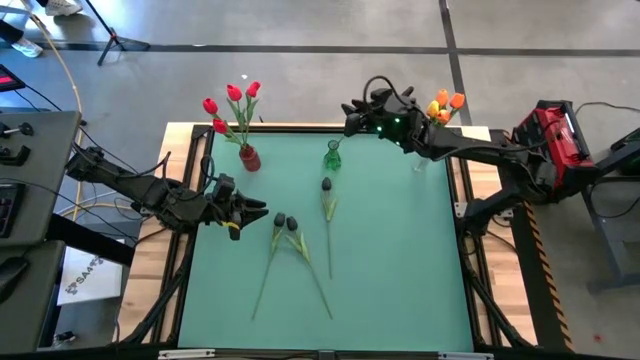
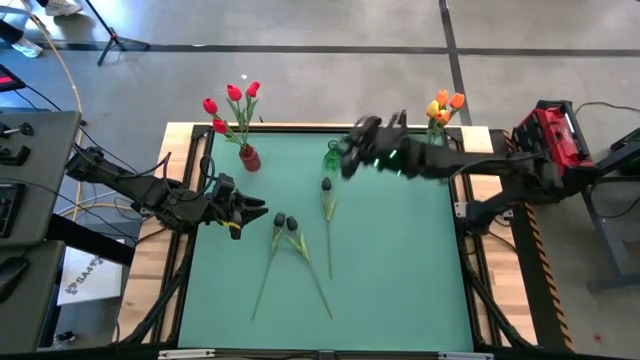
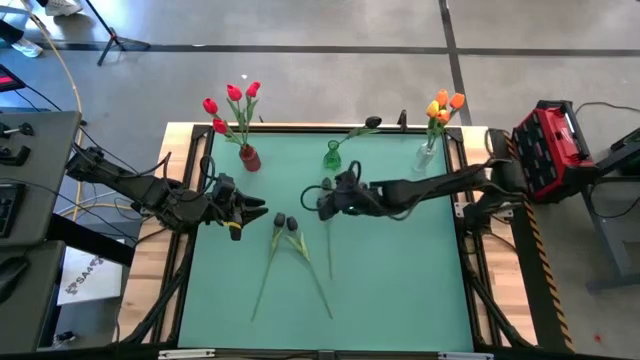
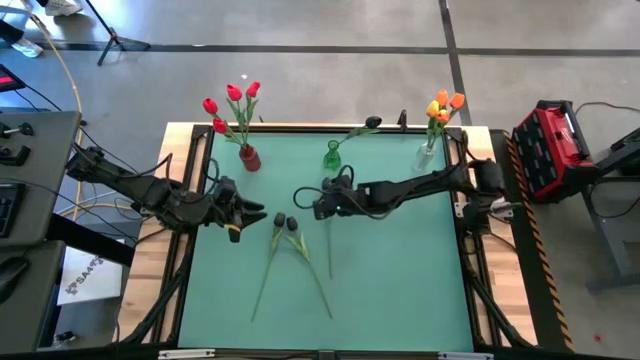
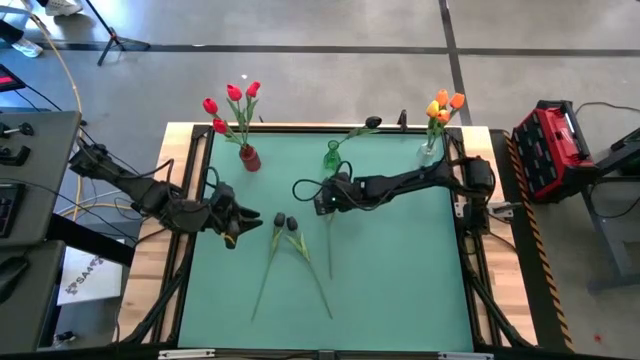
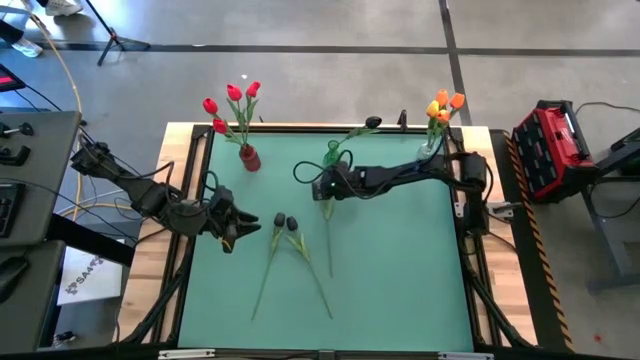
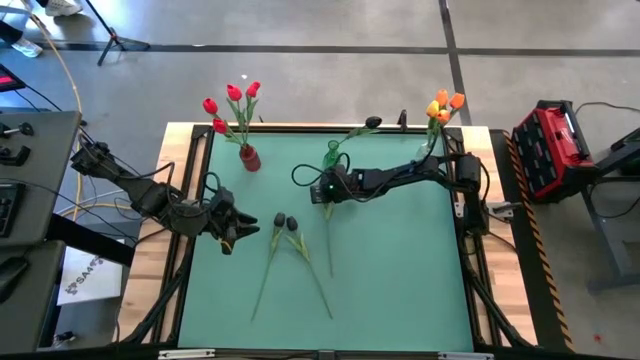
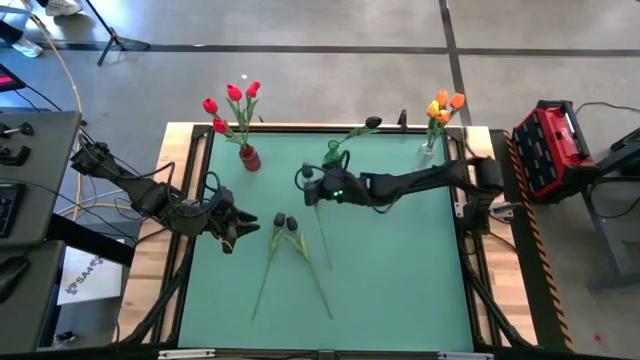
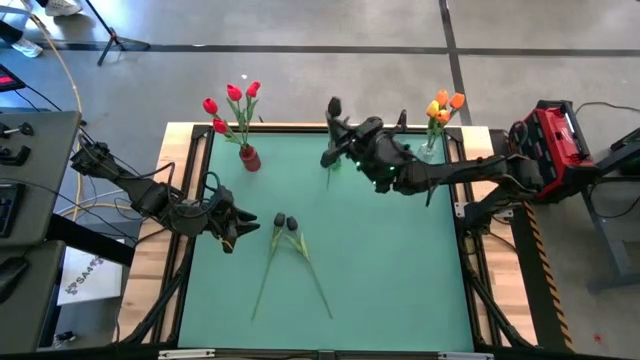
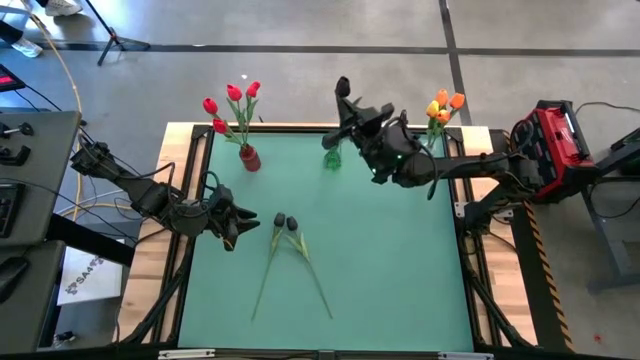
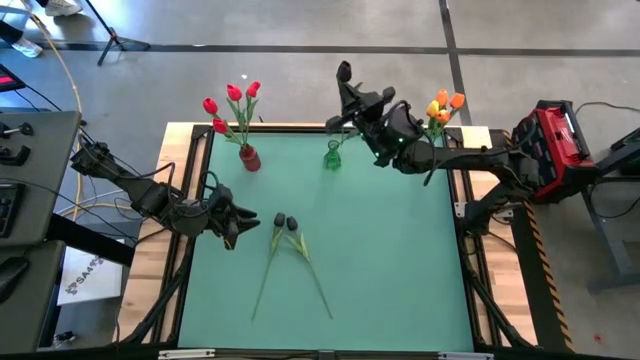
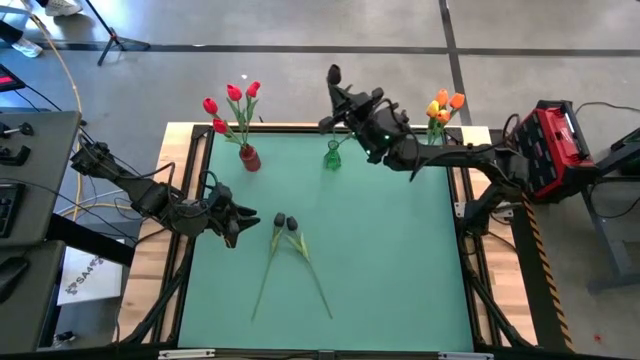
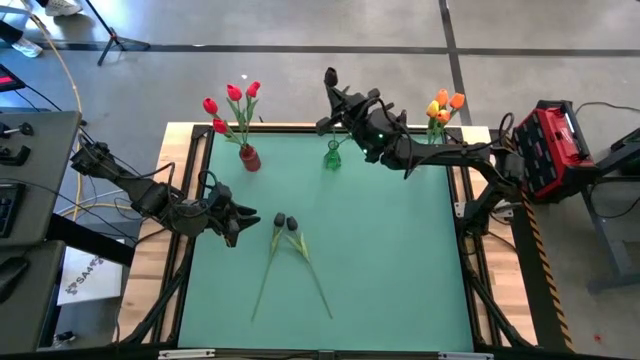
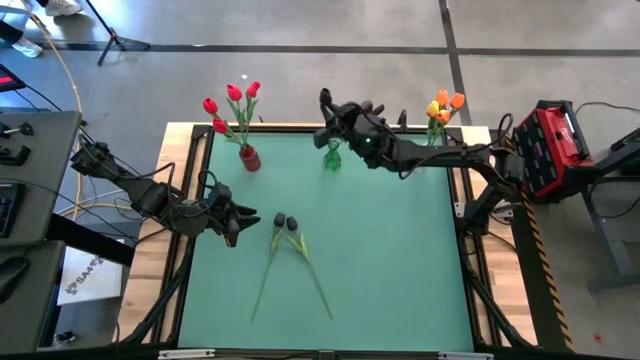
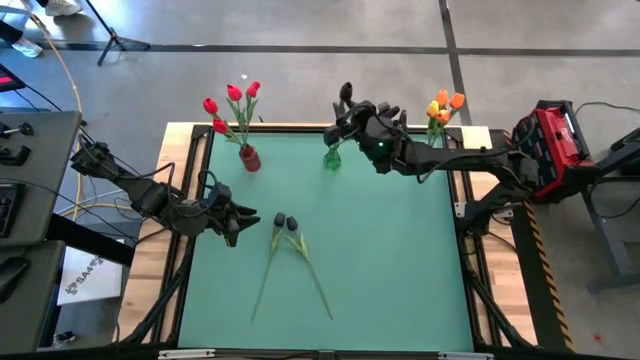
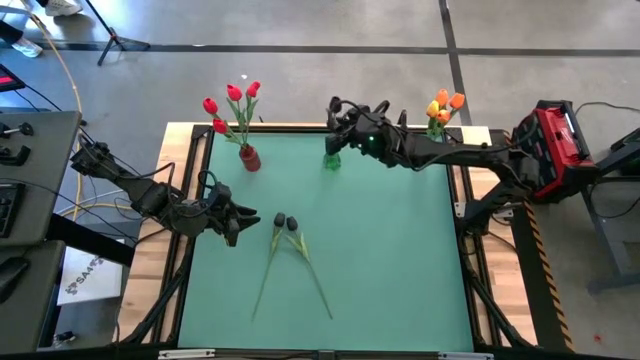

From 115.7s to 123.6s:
Task: Sort flowers into vase by color
Put the black tulip into the green vase

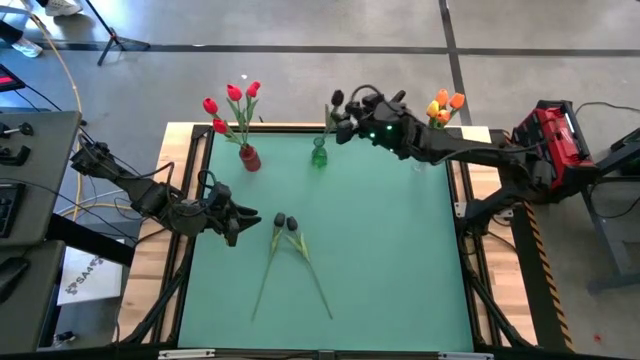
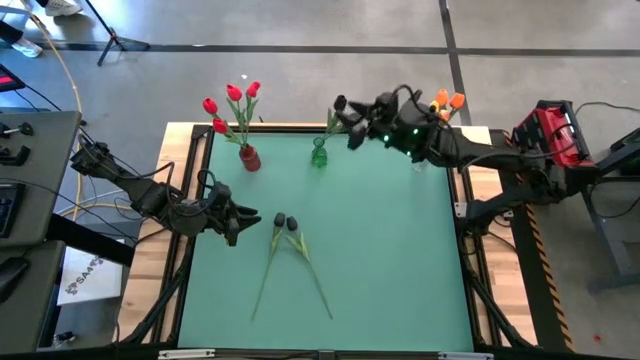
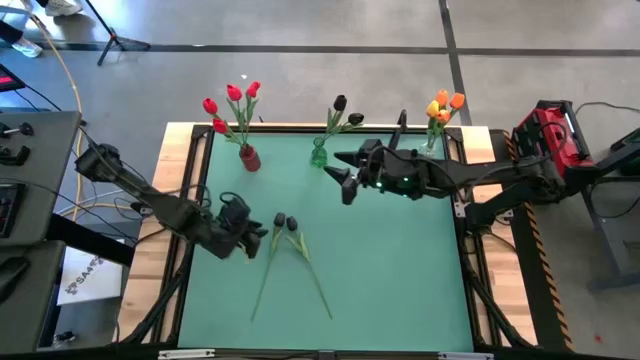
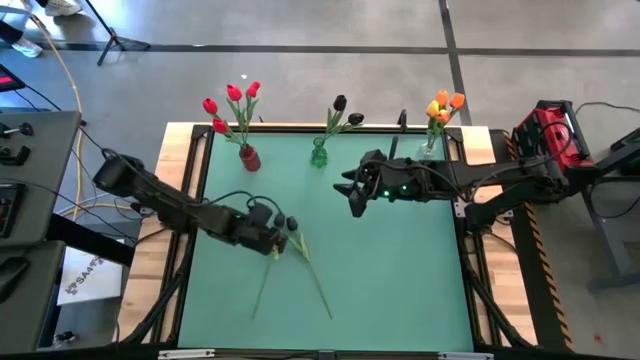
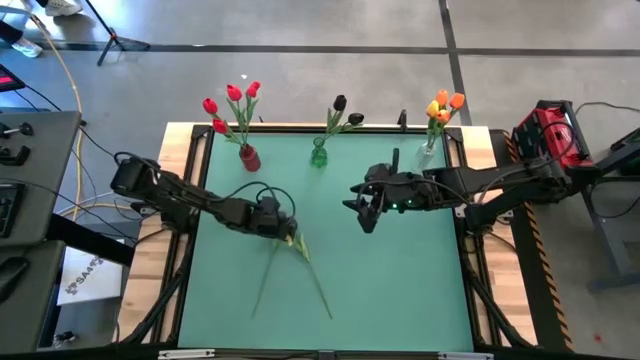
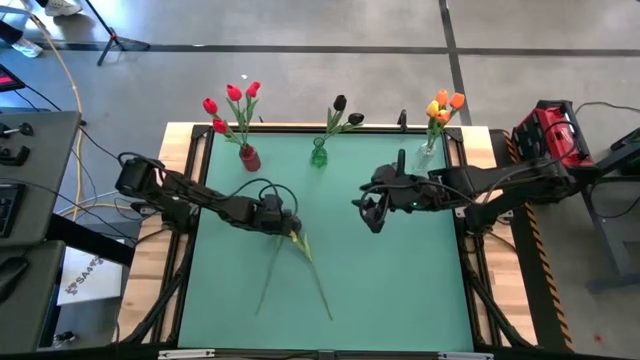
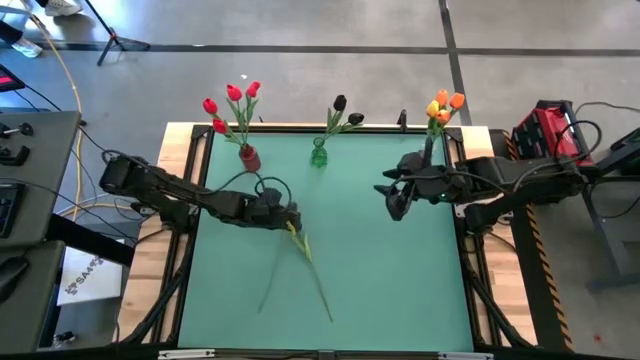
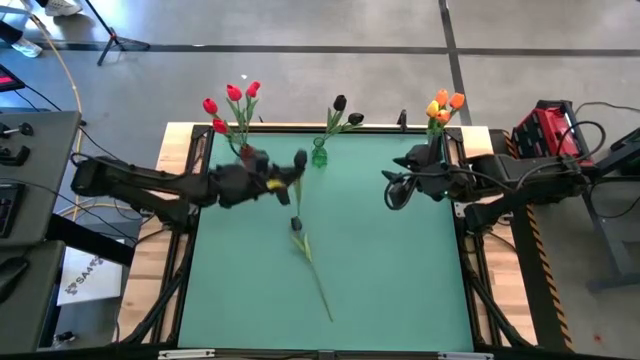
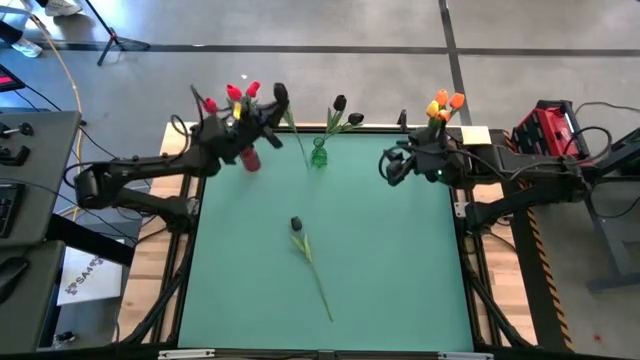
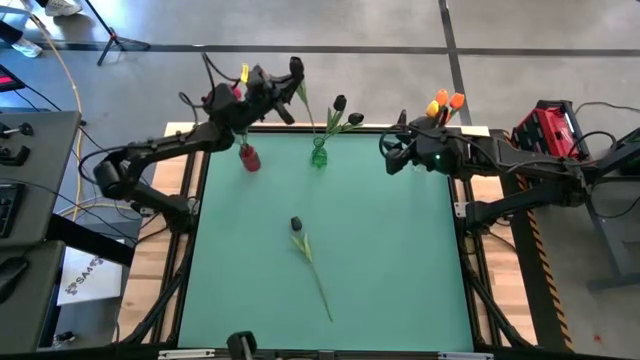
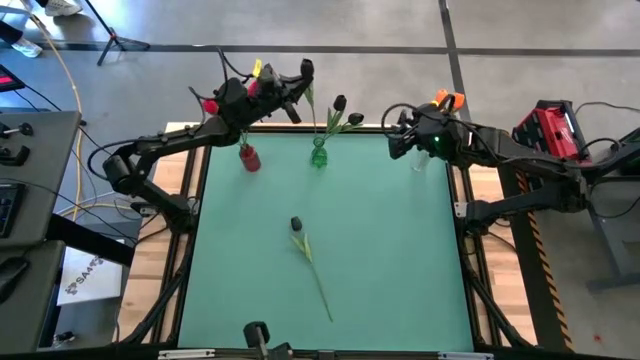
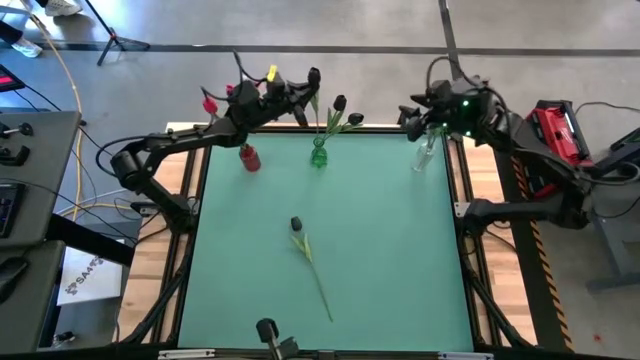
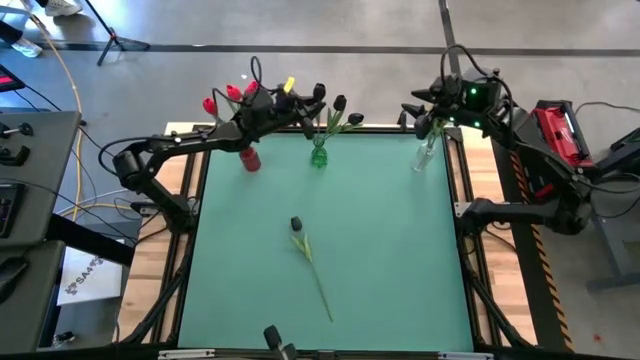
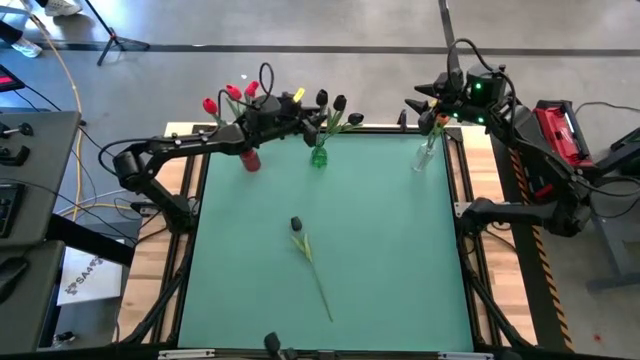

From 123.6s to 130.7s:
Put the black tulip into the green vase

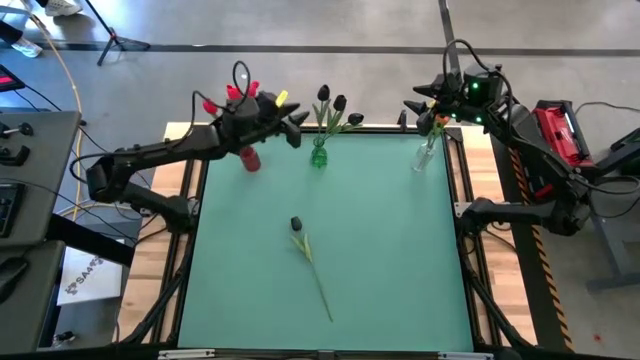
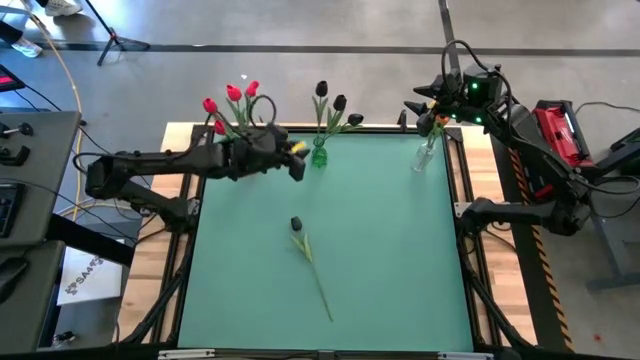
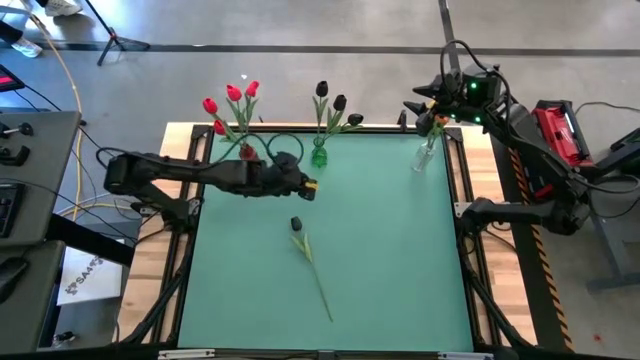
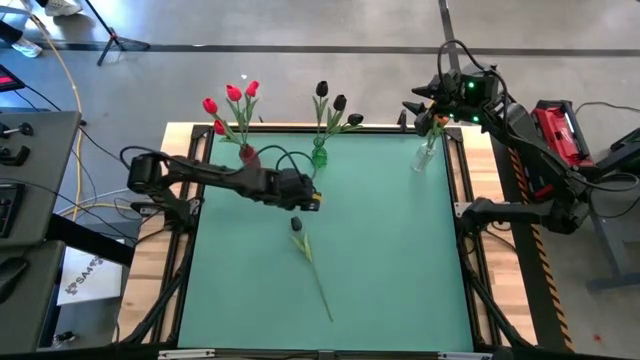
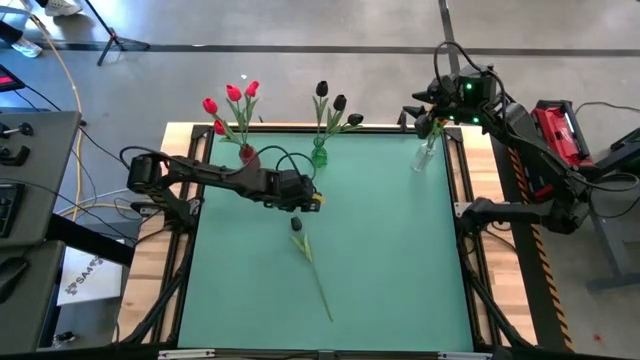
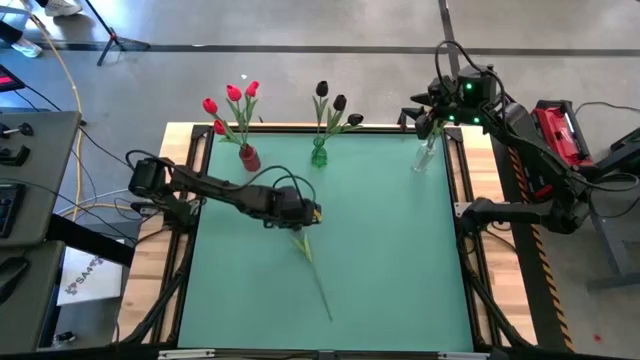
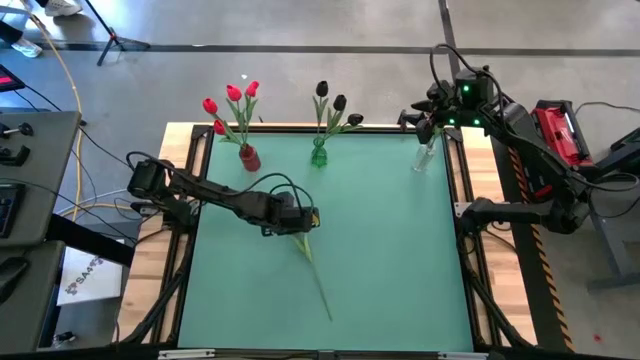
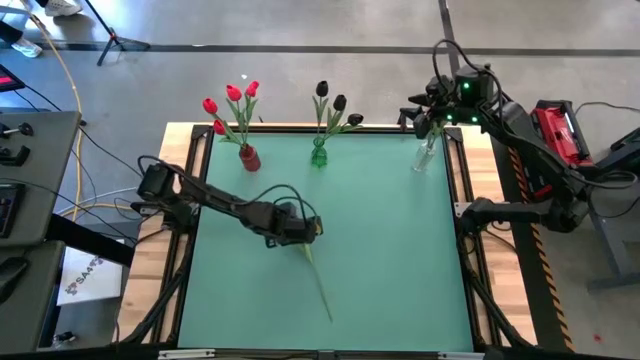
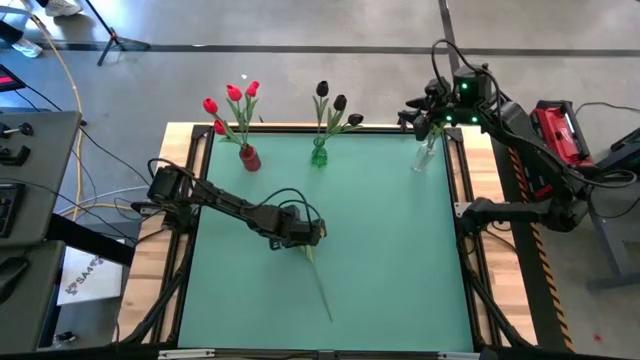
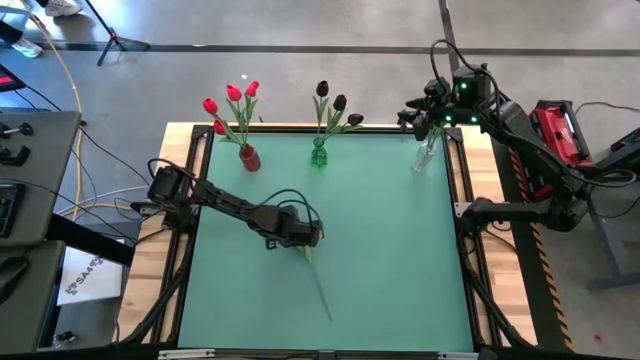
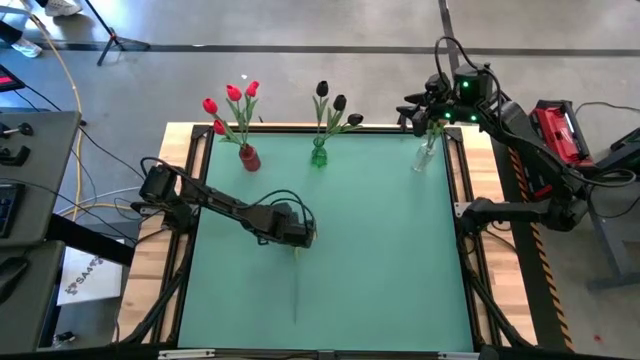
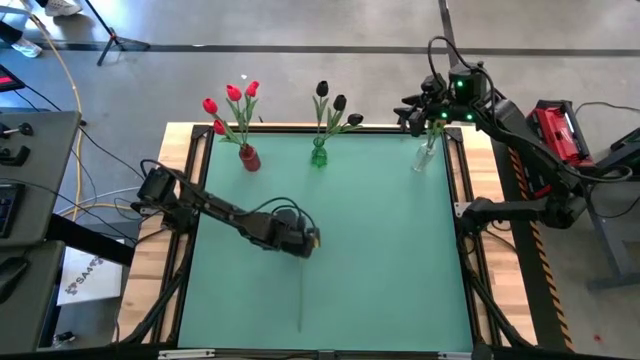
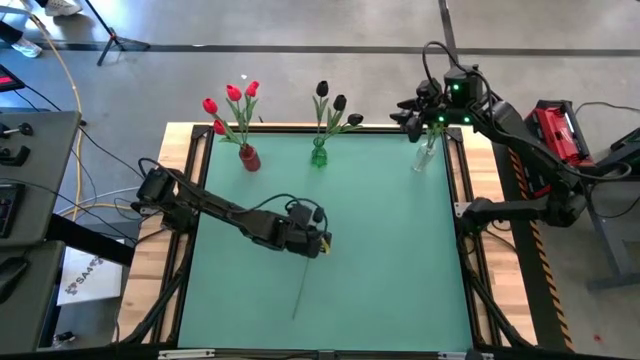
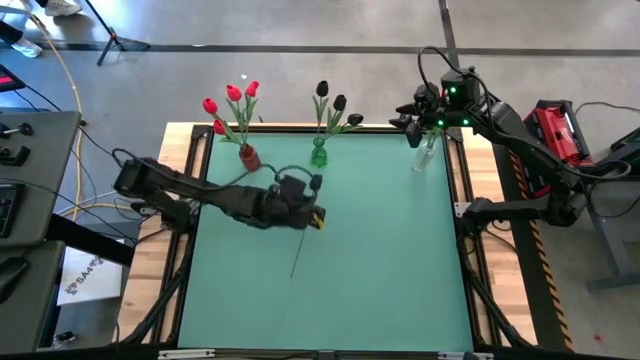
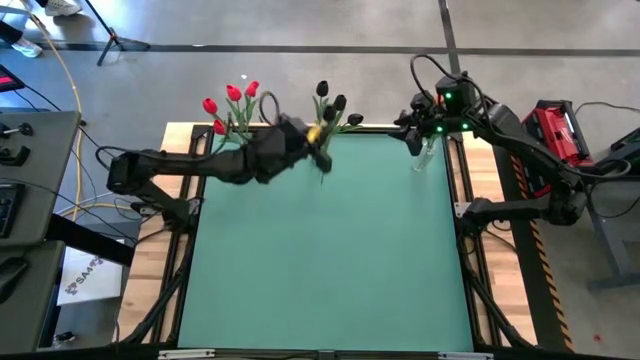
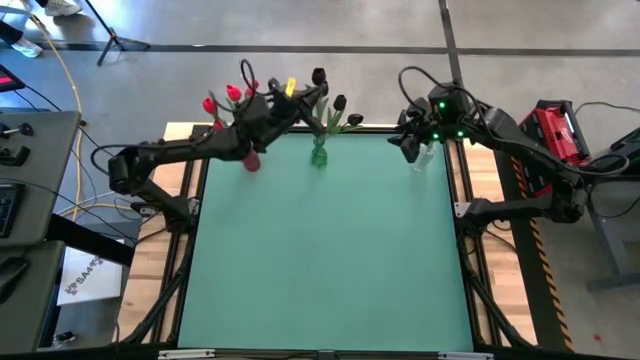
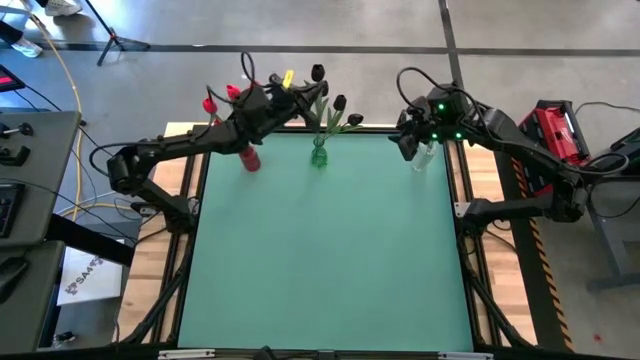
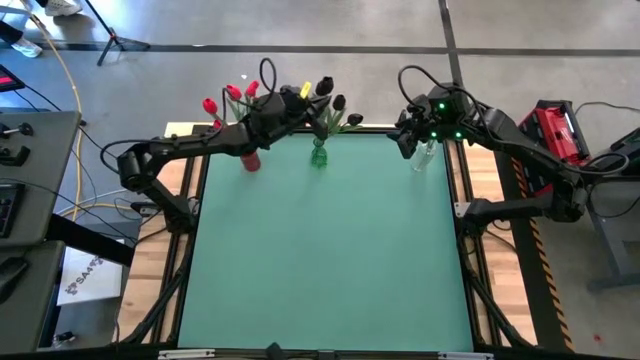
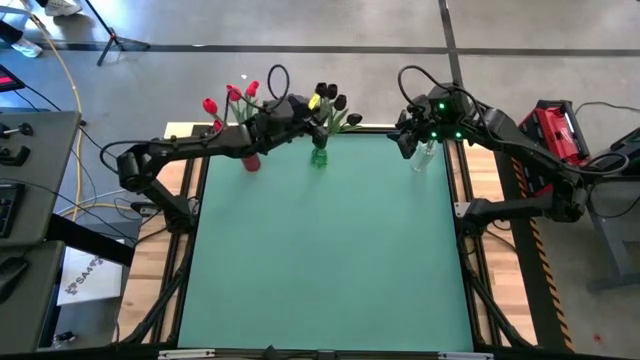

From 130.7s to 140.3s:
Put the black tulip into the green vase
